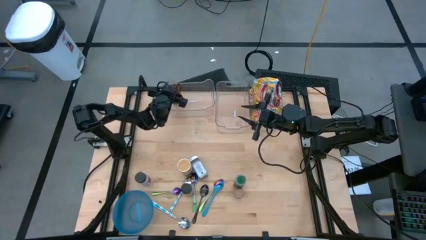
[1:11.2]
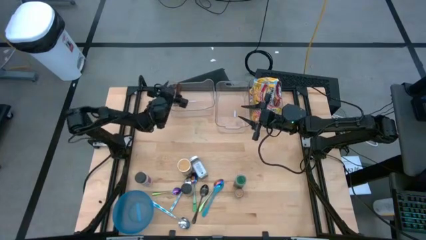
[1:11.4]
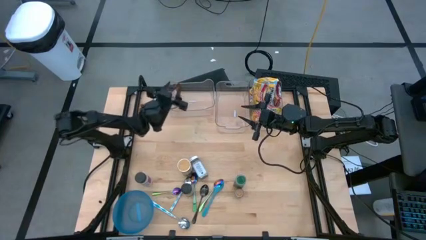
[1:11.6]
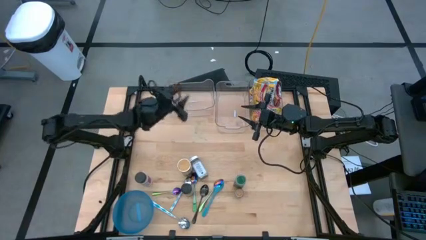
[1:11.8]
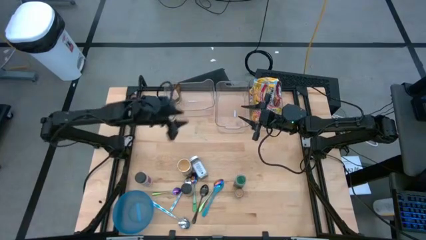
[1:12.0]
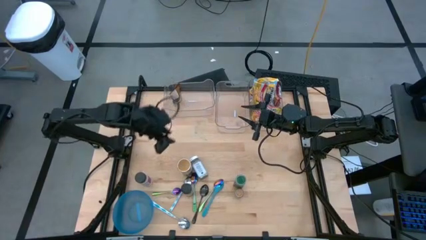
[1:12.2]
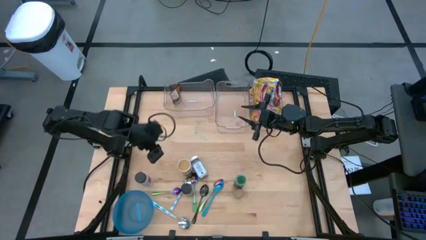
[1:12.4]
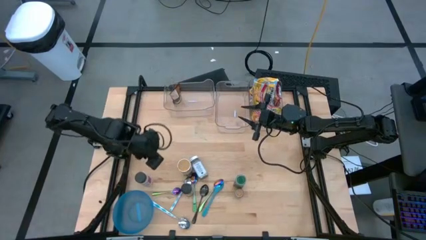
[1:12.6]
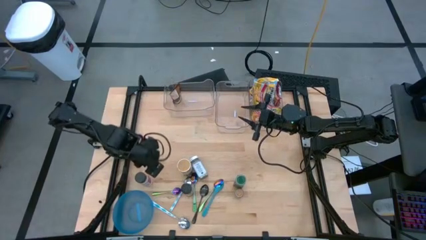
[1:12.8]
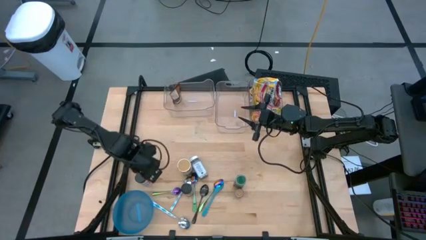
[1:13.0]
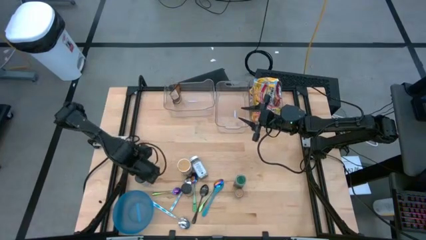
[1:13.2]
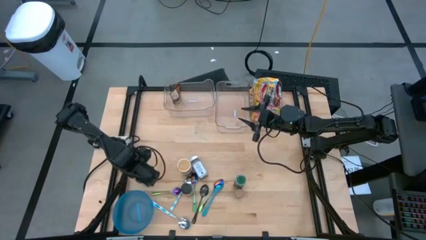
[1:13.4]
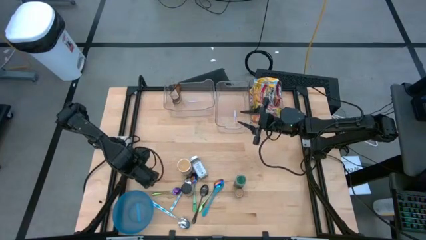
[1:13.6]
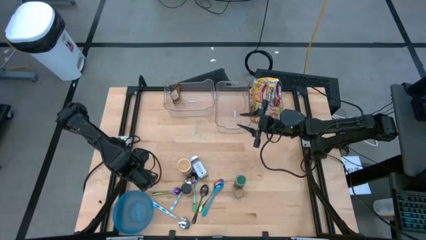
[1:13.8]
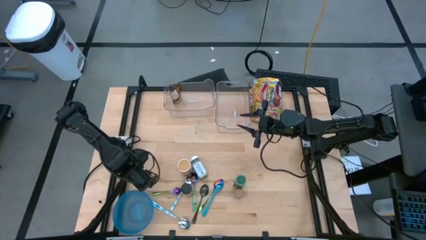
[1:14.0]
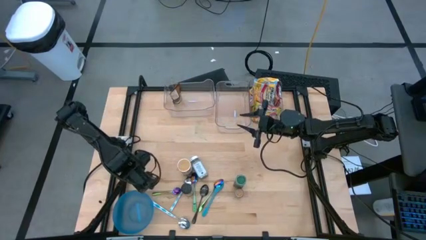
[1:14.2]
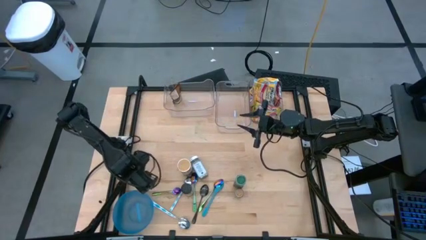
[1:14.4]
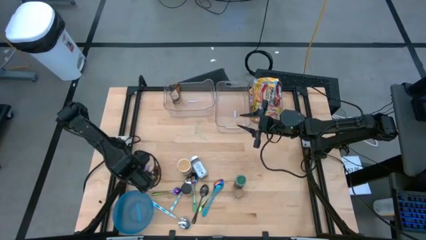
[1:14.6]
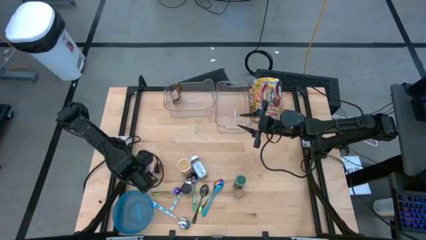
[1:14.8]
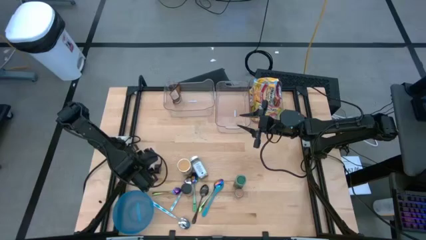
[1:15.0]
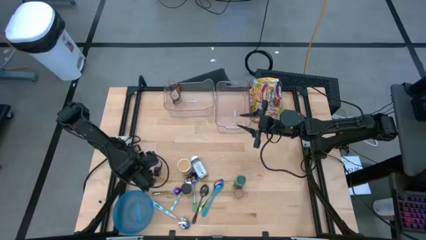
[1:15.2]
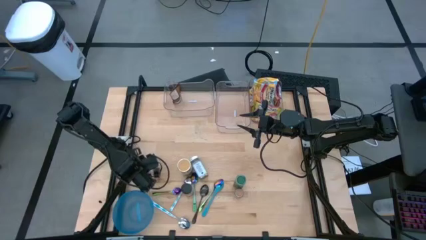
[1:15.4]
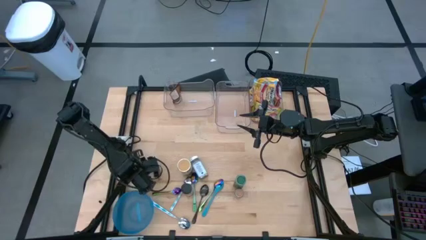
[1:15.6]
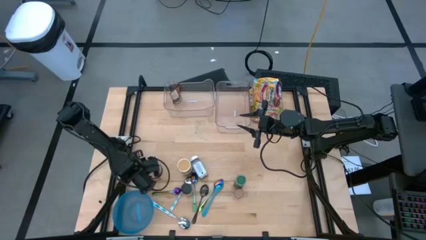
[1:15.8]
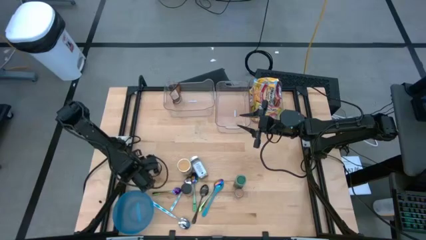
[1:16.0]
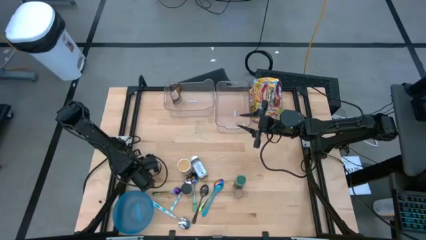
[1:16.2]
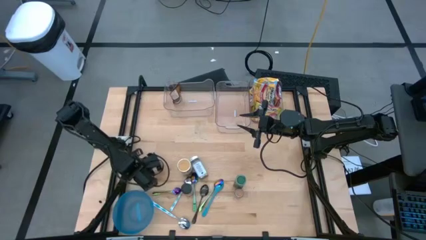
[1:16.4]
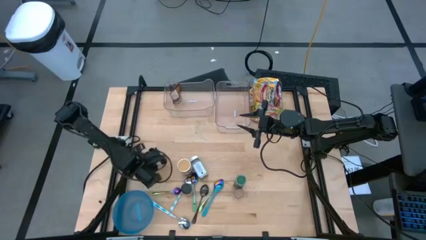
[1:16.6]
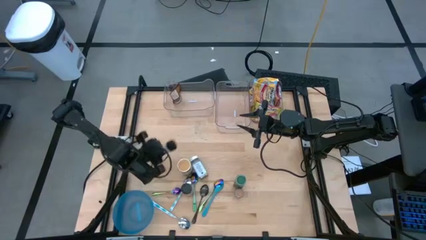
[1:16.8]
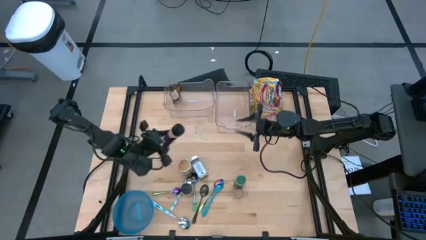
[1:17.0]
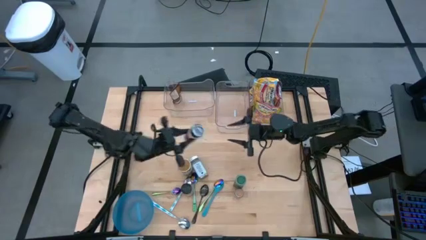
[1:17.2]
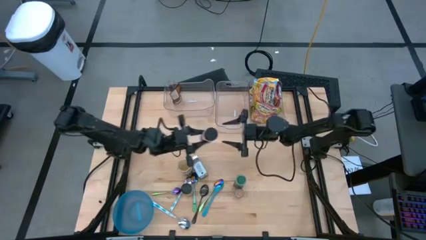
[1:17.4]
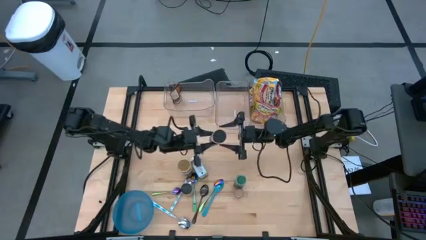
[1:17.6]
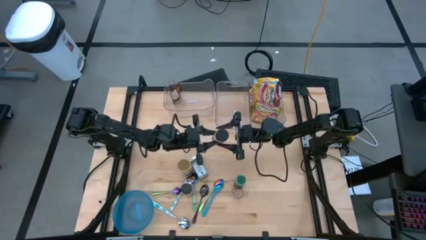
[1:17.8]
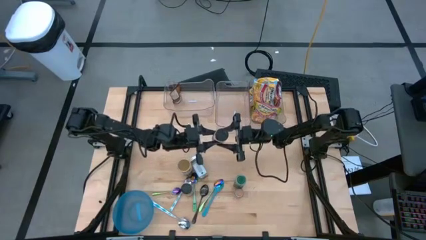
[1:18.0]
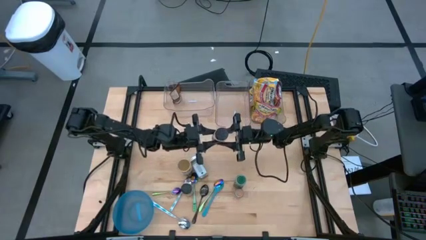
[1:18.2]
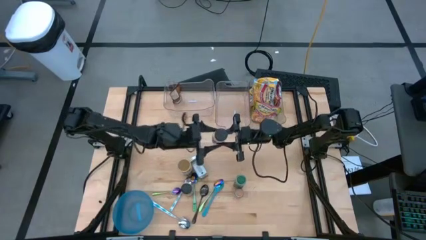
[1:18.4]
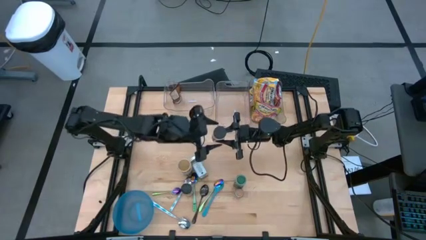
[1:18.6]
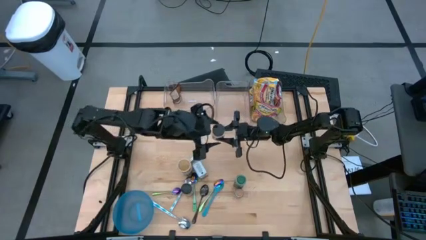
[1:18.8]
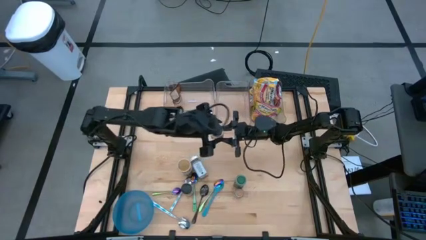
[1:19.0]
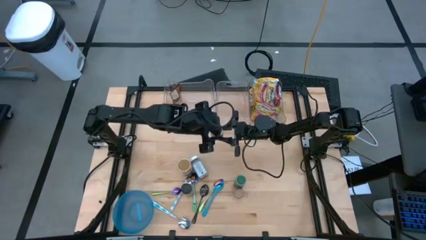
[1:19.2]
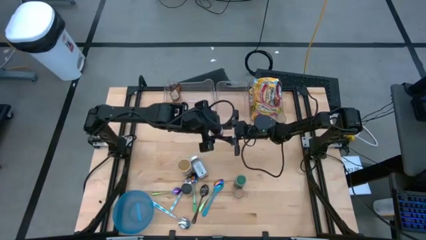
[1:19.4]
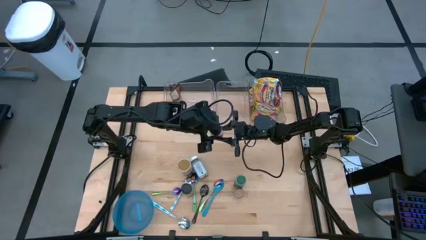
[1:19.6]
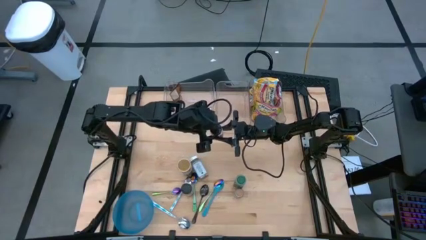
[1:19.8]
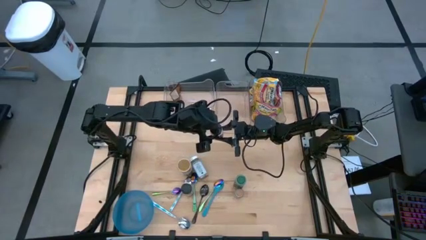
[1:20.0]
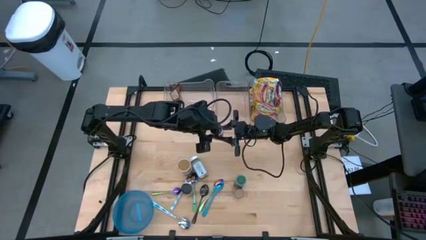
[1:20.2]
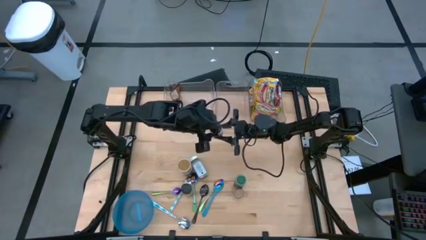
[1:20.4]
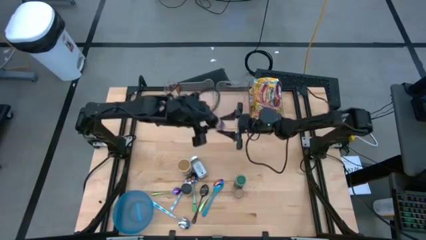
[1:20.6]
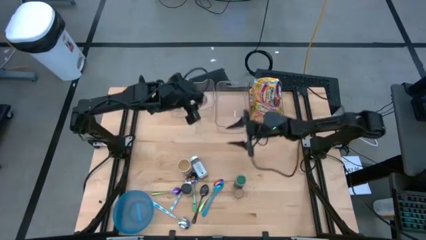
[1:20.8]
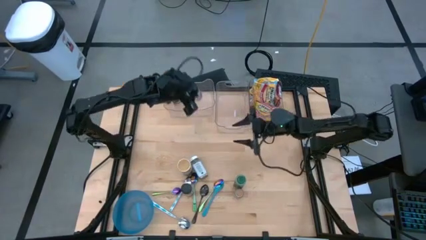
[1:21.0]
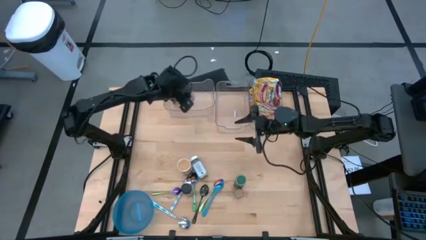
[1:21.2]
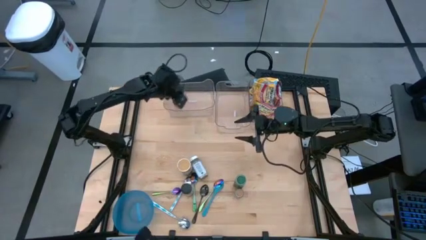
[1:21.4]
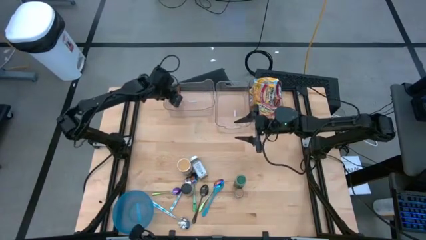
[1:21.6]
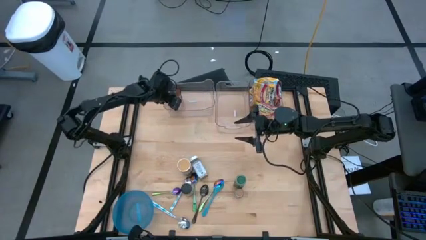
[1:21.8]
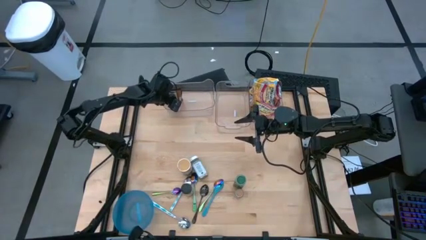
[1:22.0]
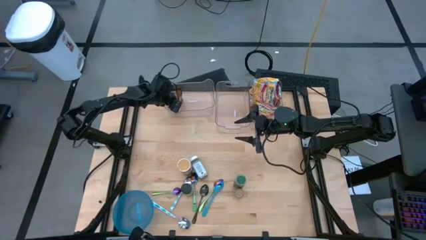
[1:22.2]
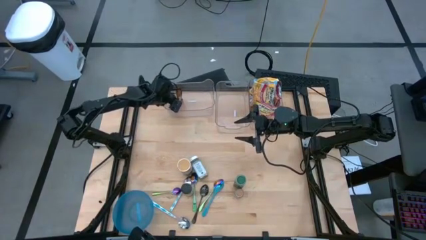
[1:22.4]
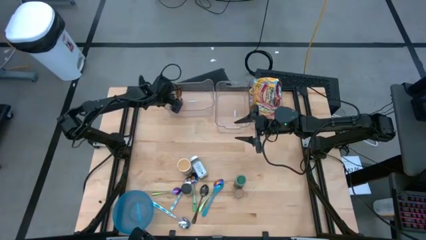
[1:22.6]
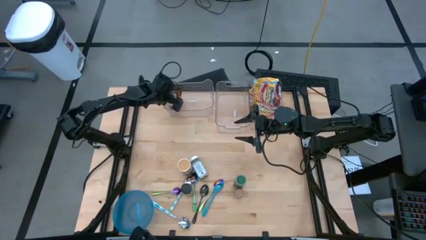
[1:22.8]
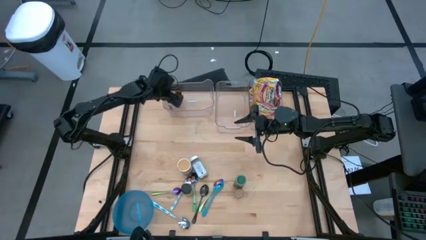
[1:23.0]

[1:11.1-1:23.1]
Task: Pick & Place Food Item
Put the purple seasoning into the left transparent bin
